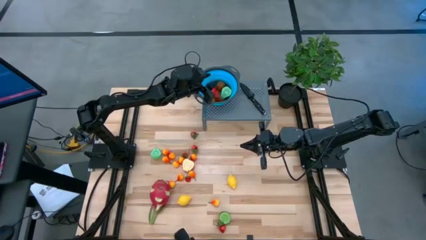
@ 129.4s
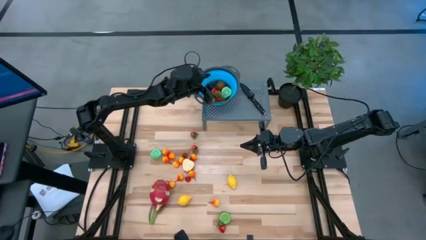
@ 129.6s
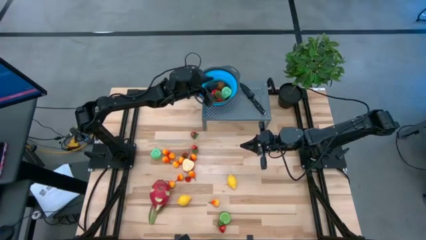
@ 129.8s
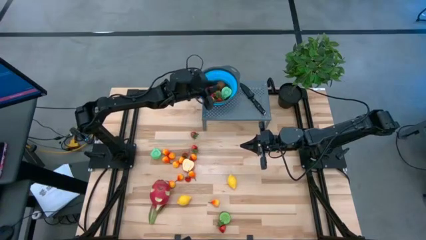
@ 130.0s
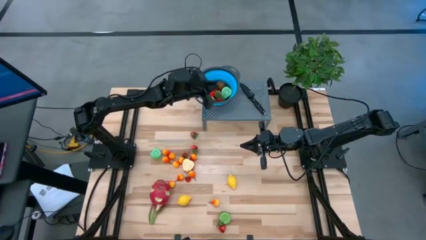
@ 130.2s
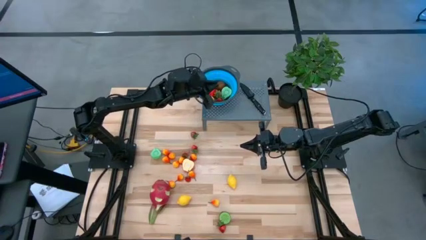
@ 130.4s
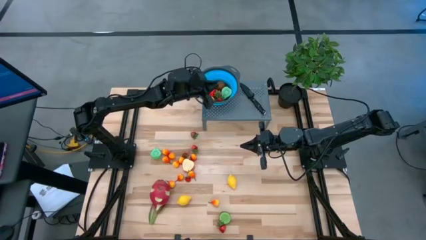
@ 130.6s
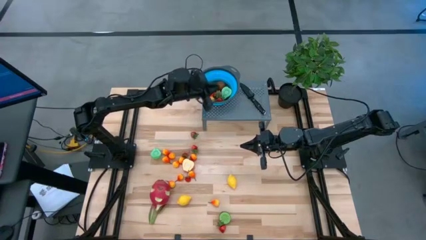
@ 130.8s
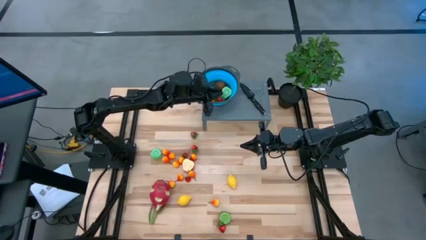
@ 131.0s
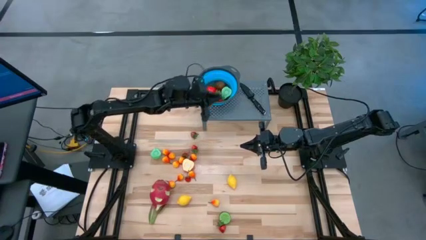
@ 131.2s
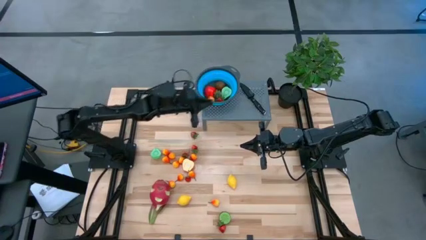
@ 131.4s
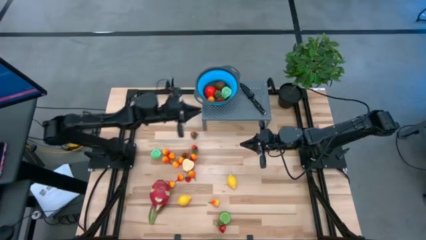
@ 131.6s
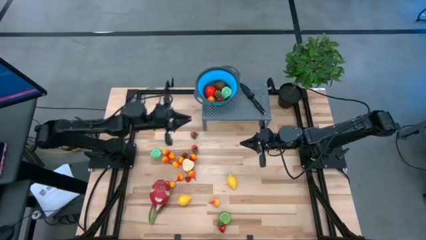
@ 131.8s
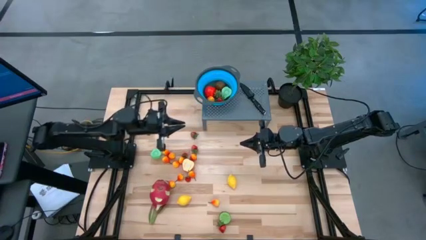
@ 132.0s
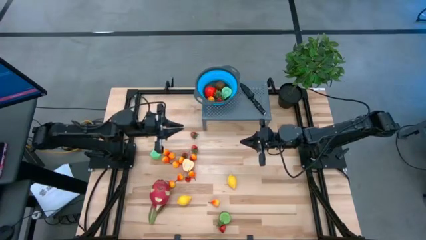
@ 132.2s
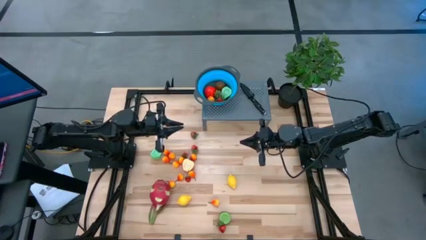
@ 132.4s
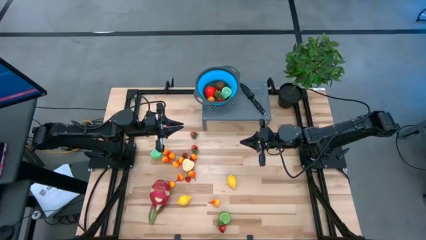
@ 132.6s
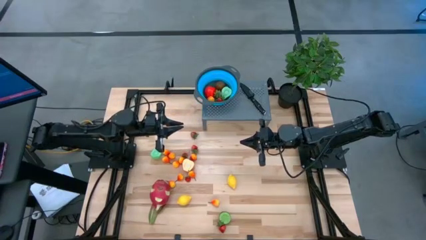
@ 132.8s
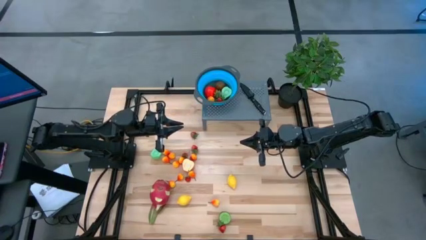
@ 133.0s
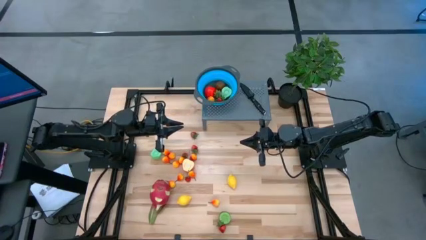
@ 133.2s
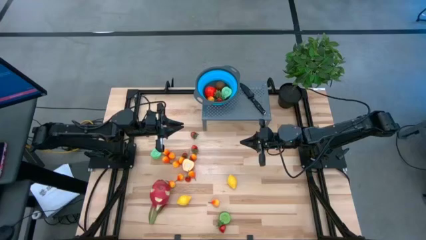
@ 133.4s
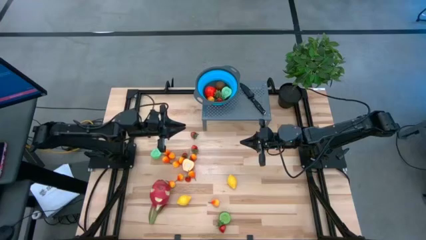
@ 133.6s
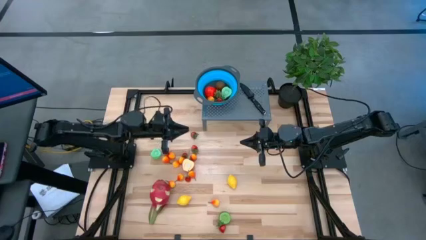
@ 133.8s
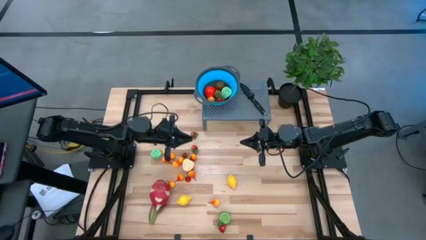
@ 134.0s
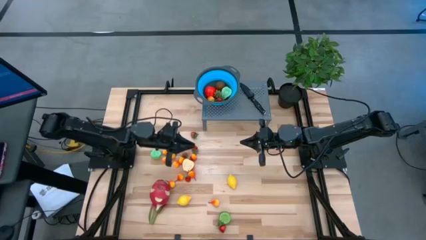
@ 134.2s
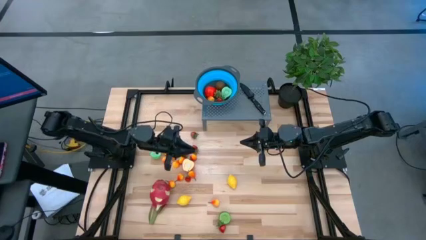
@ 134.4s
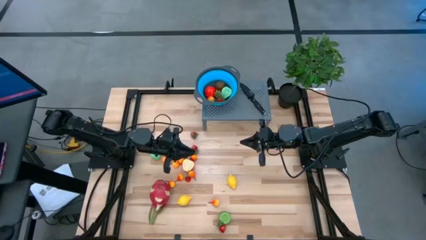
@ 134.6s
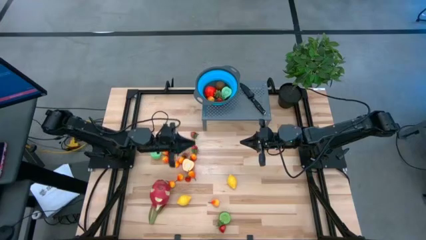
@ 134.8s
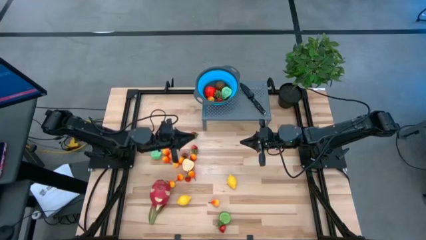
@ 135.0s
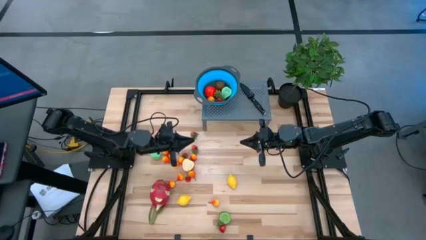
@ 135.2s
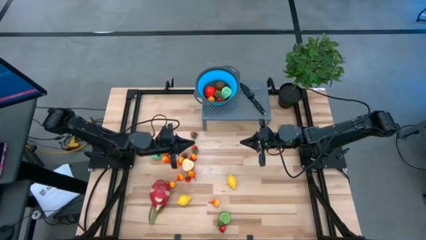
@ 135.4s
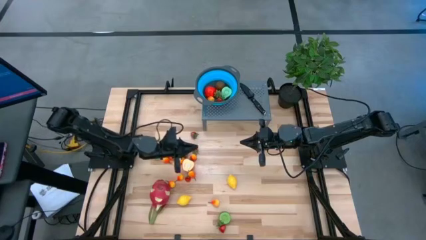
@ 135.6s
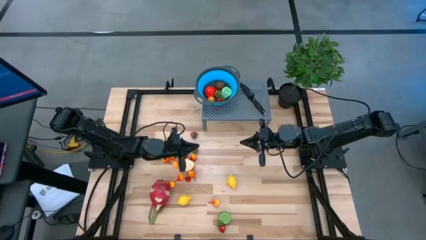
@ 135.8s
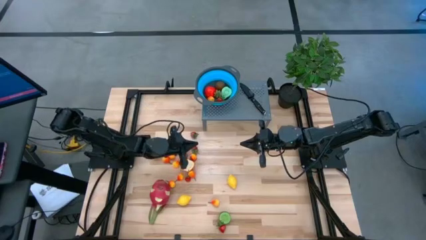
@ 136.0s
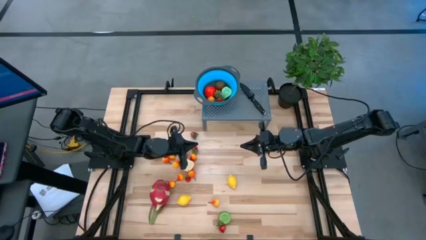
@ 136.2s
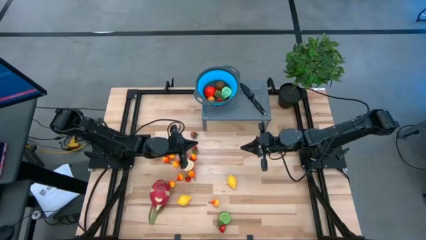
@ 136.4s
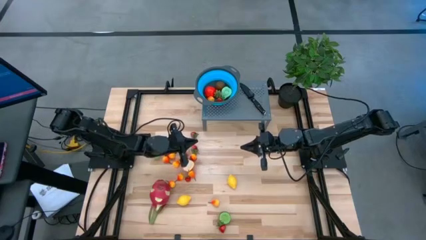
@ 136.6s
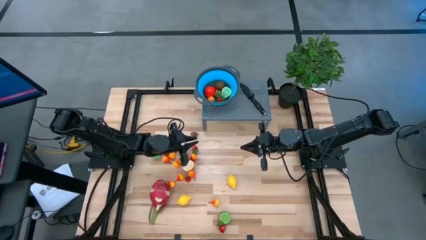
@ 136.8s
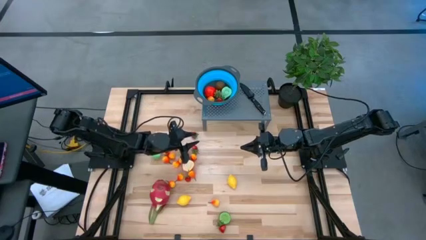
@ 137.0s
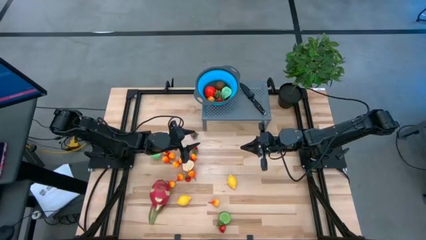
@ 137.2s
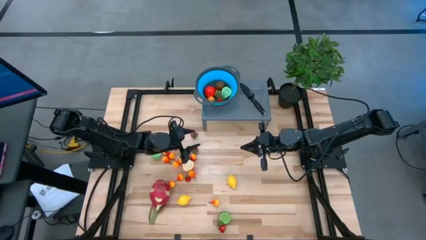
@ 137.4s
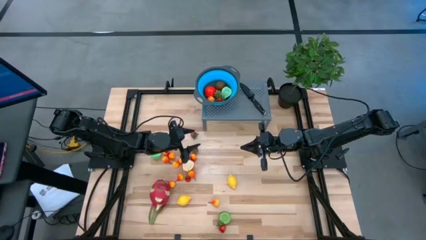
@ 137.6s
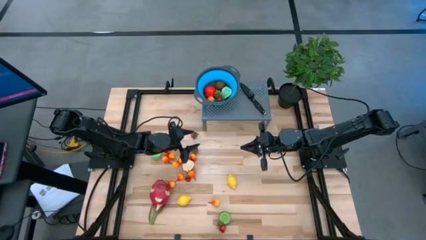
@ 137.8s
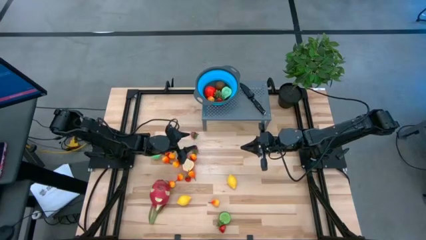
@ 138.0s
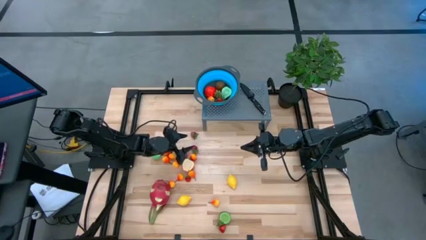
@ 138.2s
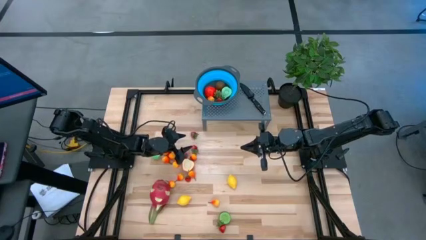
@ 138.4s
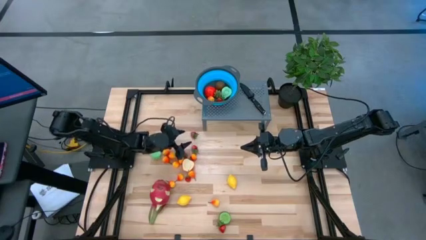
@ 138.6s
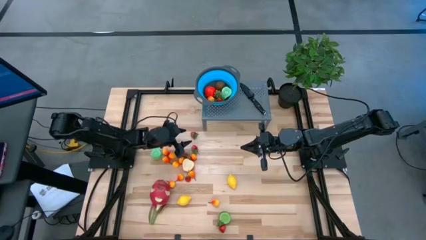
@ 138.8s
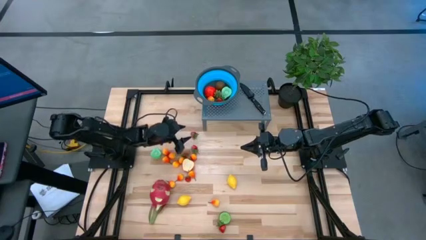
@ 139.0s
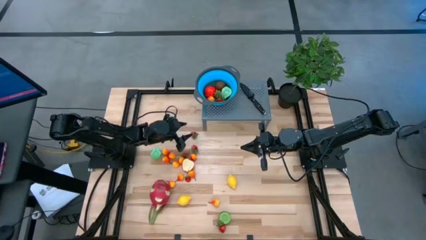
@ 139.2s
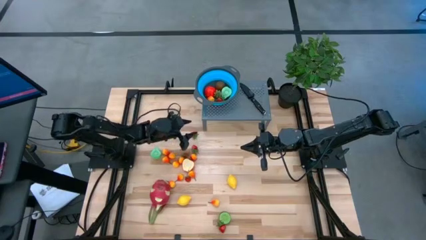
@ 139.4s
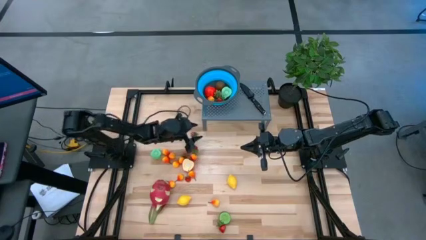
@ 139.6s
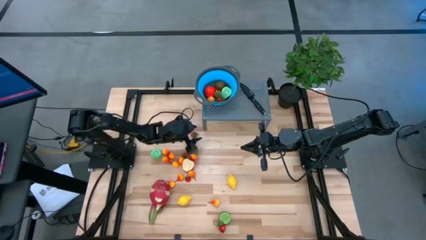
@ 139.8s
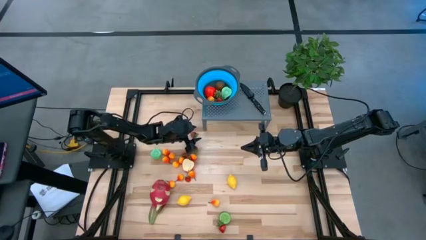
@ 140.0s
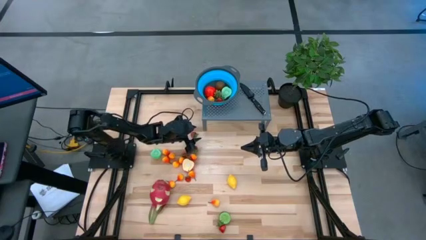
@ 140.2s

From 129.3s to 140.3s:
Task: Pick & Place Fruit
Put the strawberry into the strainer bowl

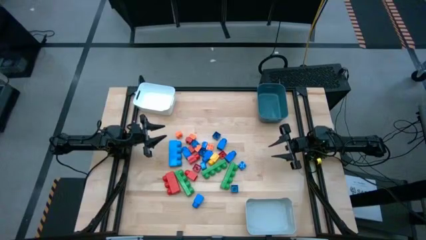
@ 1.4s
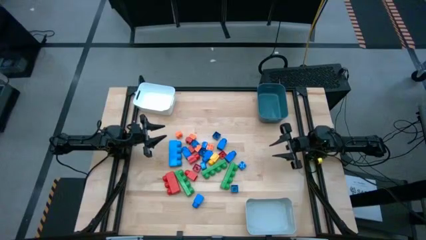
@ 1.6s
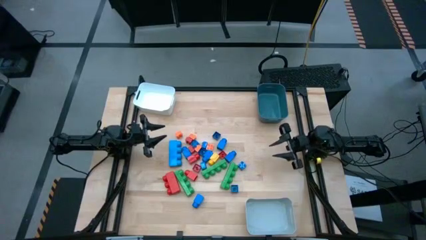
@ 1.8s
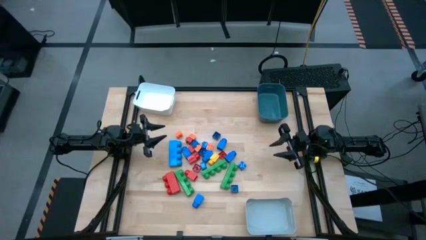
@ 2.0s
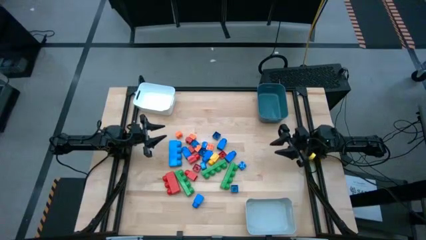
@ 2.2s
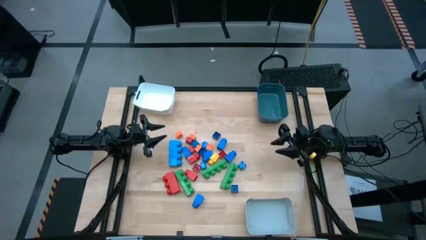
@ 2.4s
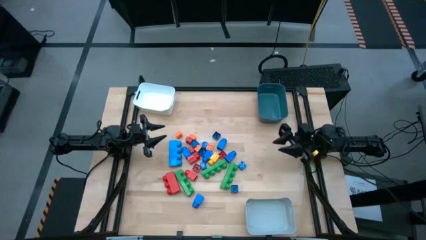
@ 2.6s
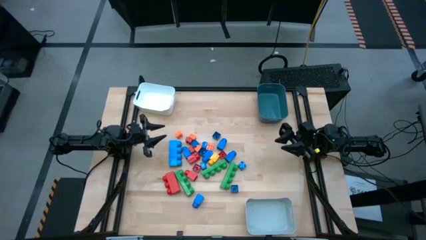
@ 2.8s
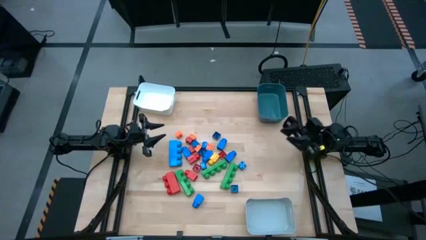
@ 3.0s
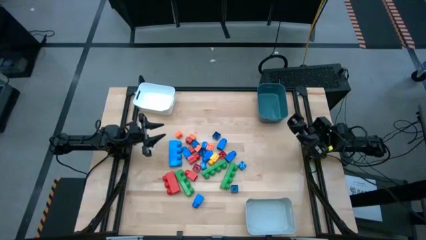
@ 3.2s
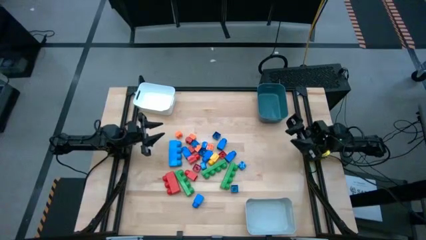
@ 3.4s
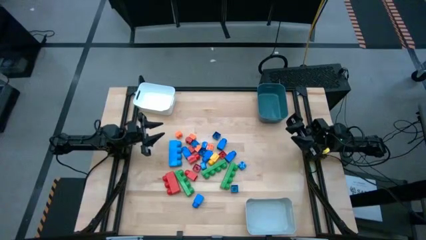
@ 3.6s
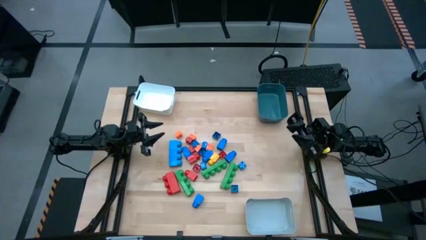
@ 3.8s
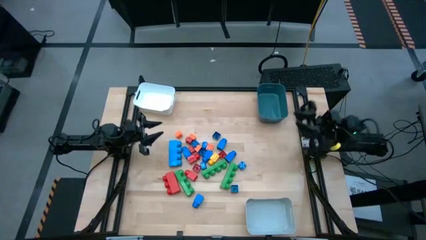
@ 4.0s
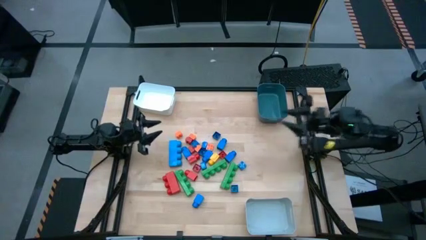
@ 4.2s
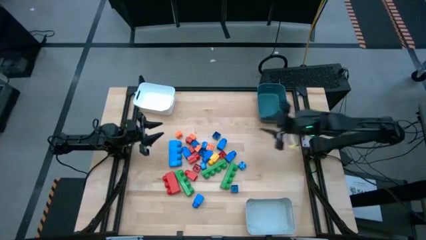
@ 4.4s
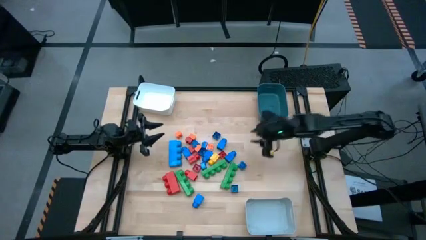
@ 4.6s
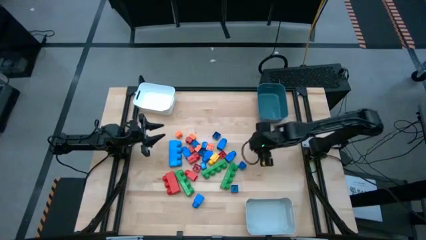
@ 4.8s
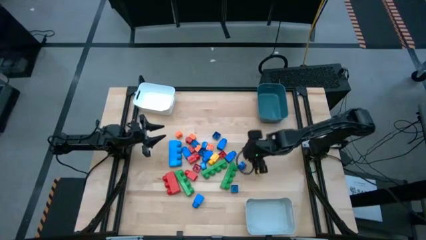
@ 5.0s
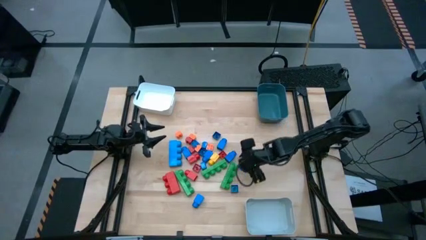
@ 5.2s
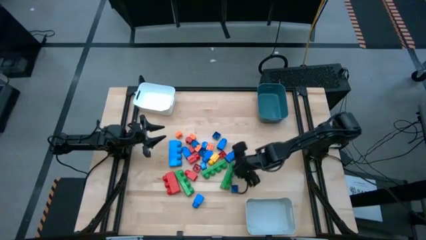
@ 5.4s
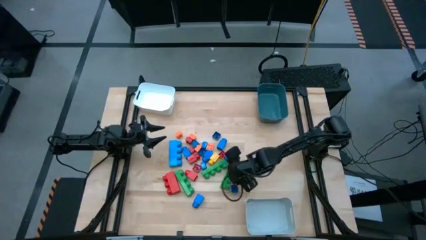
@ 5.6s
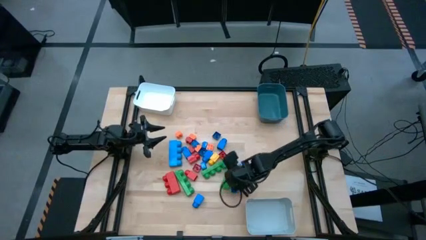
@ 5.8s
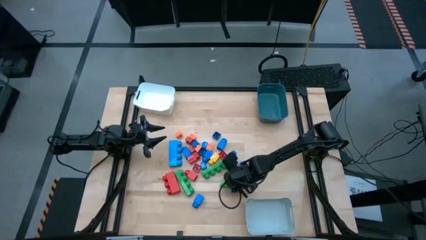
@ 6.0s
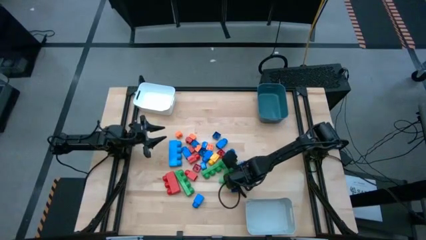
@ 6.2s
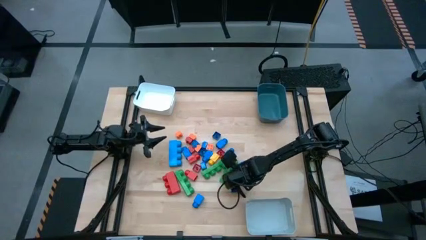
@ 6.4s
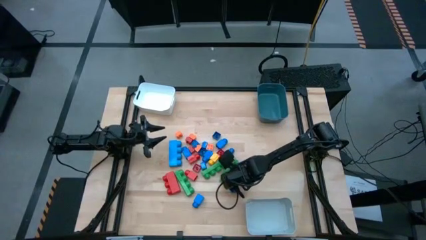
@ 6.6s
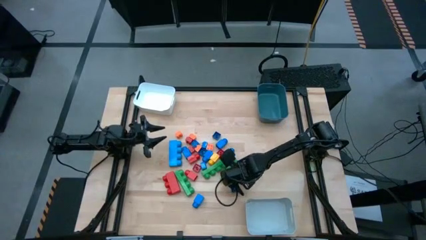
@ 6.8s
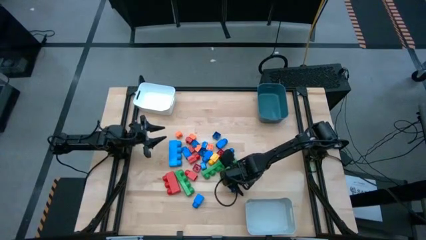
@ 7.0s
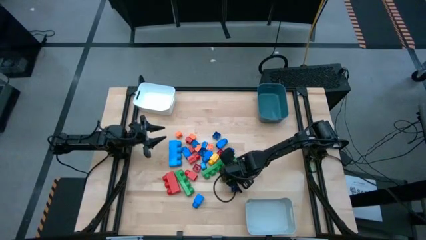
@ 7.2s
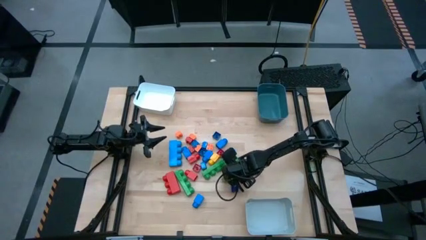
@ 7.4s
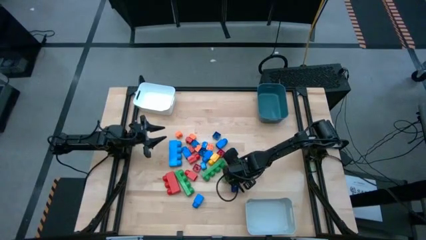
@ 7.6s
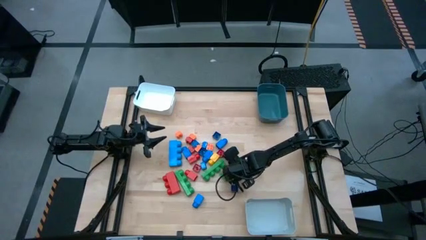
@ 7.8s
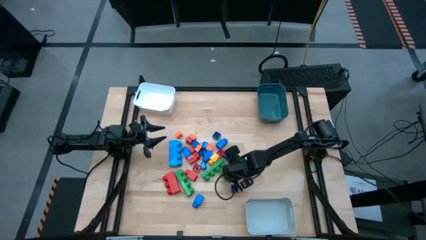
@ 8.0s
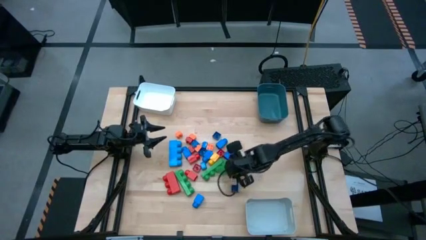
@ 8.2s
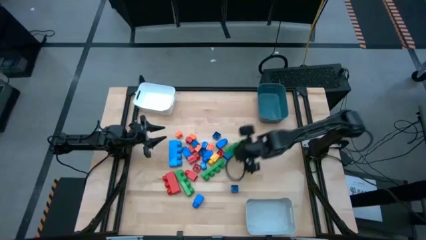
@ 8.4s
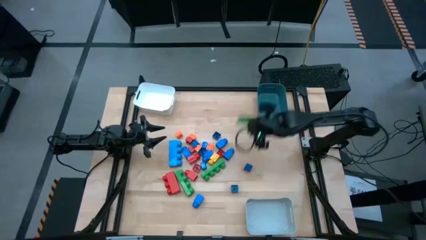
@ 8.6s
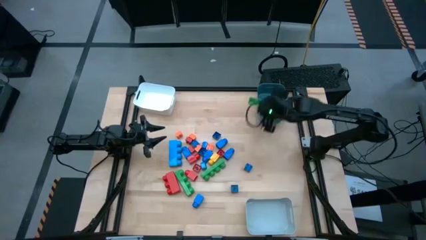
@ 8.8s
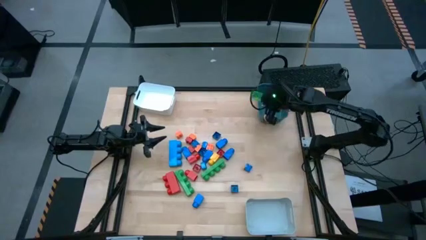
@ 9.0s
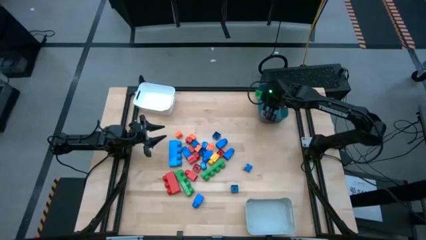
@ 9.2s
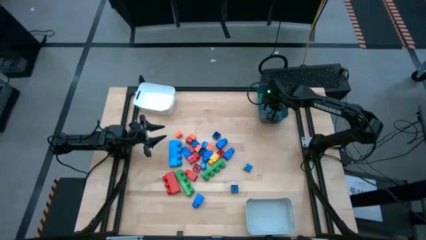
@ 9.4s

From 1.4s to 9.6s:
Task: Sort blocks by size
Put the large 4 stud green game piece into the blue bin
